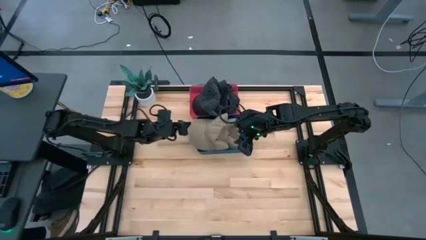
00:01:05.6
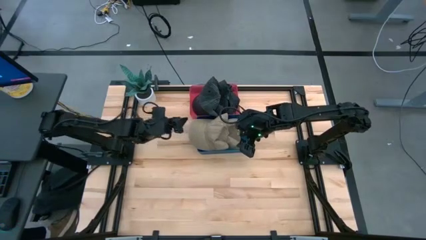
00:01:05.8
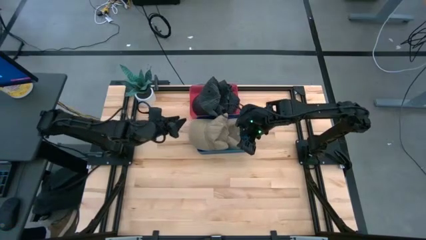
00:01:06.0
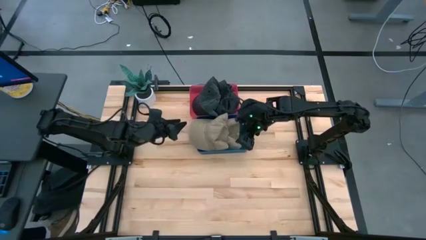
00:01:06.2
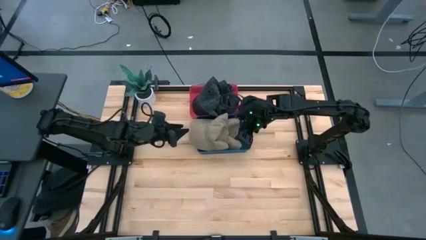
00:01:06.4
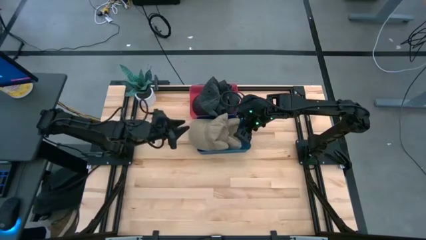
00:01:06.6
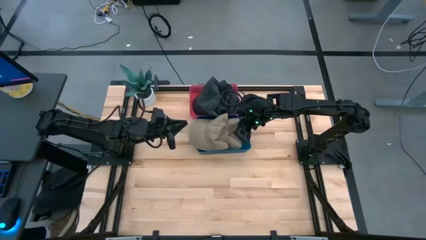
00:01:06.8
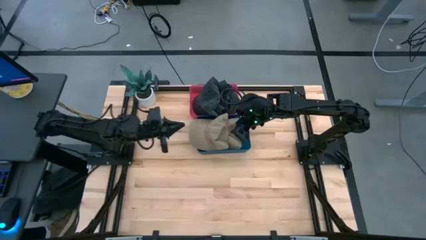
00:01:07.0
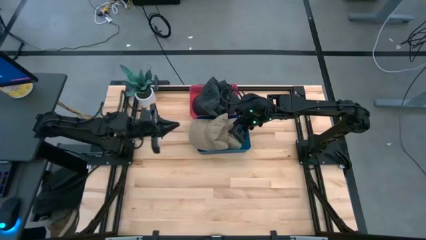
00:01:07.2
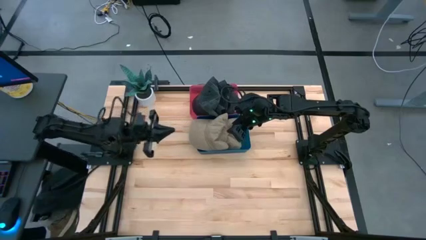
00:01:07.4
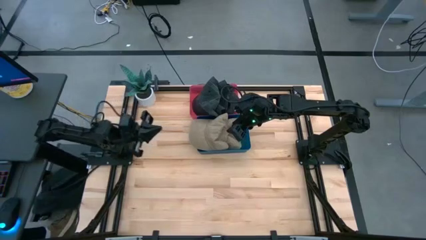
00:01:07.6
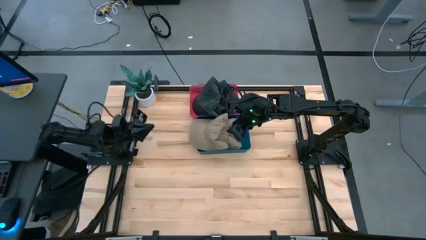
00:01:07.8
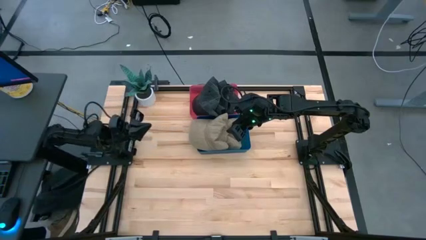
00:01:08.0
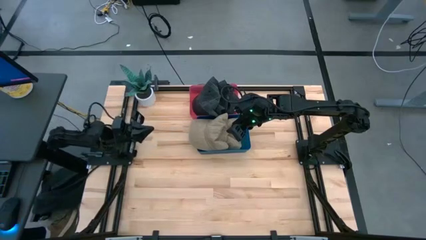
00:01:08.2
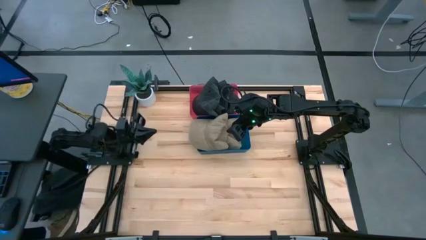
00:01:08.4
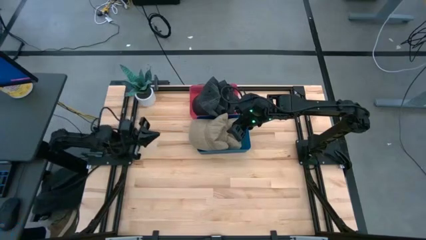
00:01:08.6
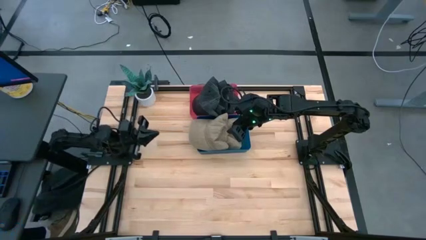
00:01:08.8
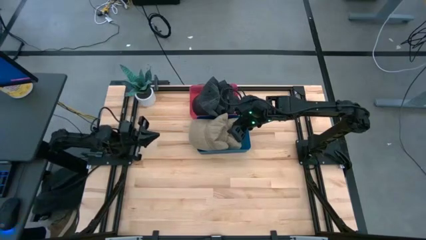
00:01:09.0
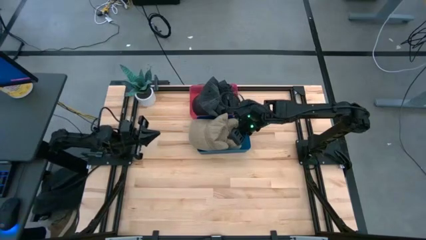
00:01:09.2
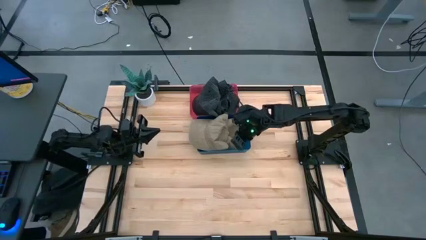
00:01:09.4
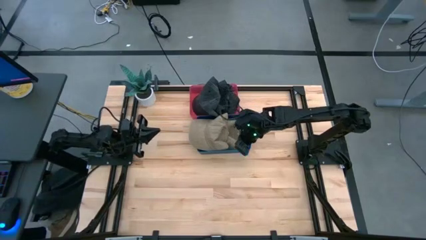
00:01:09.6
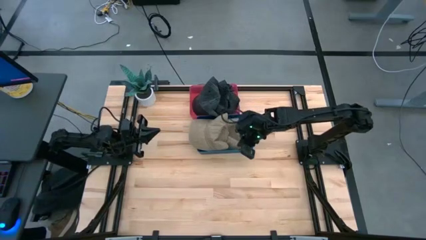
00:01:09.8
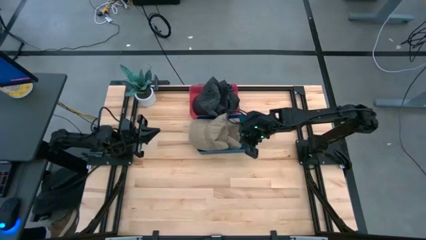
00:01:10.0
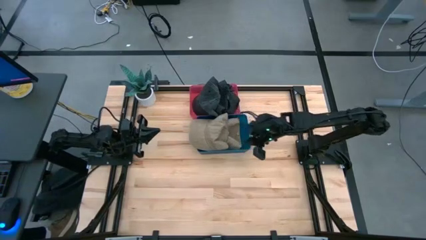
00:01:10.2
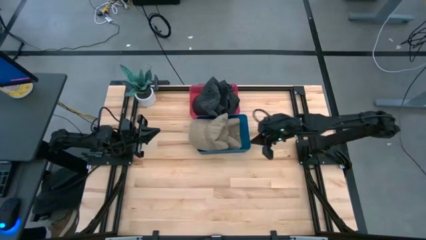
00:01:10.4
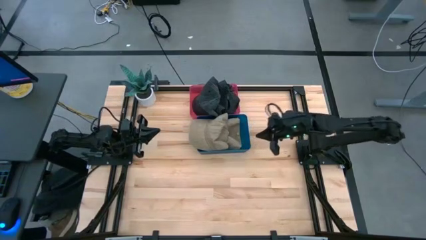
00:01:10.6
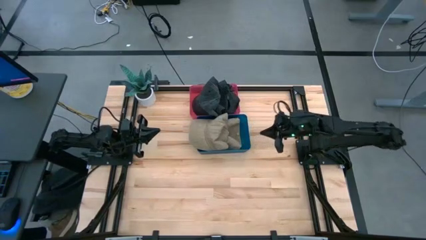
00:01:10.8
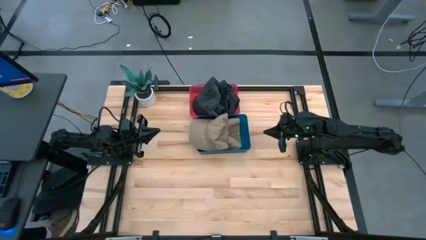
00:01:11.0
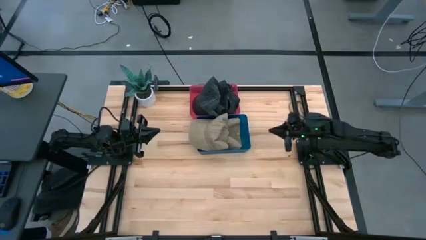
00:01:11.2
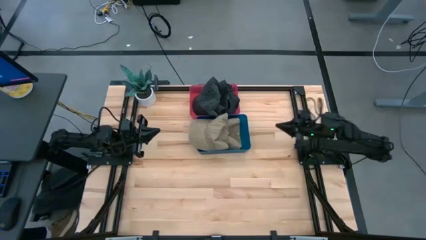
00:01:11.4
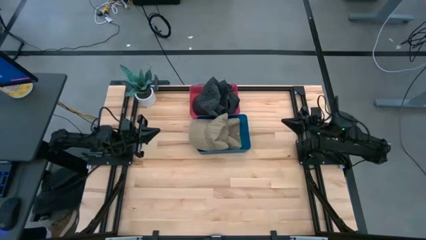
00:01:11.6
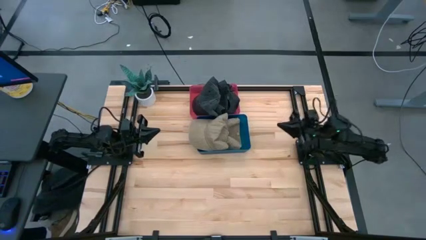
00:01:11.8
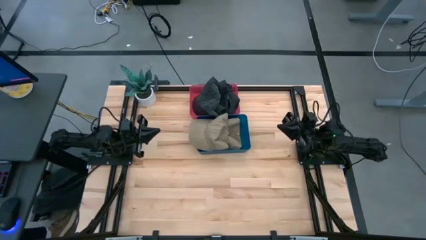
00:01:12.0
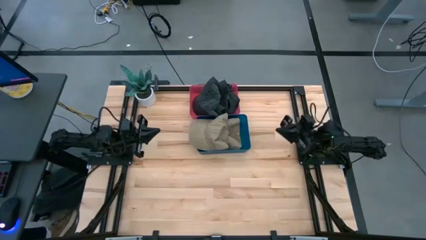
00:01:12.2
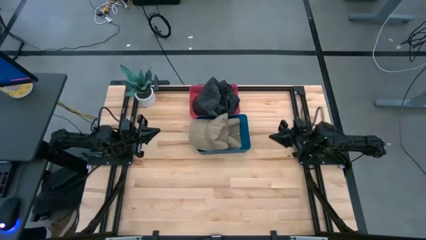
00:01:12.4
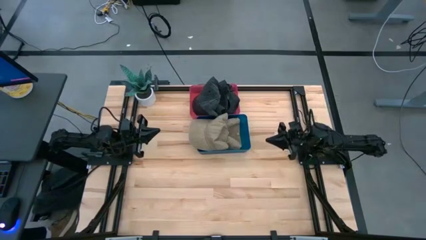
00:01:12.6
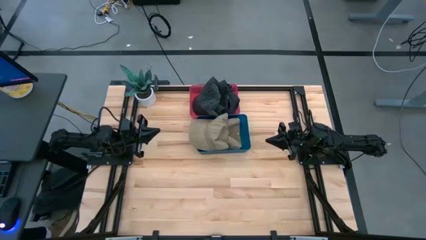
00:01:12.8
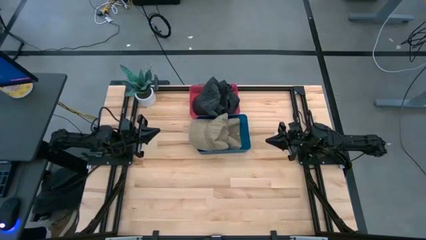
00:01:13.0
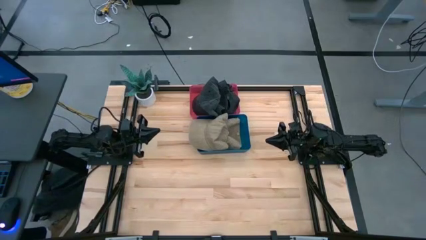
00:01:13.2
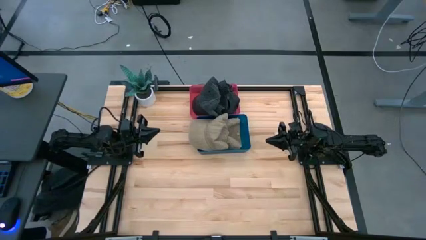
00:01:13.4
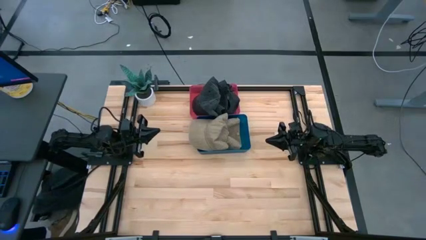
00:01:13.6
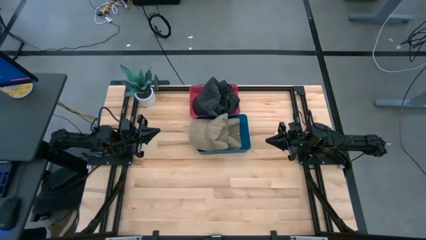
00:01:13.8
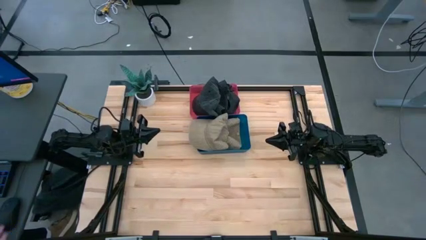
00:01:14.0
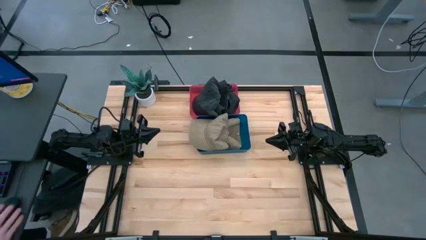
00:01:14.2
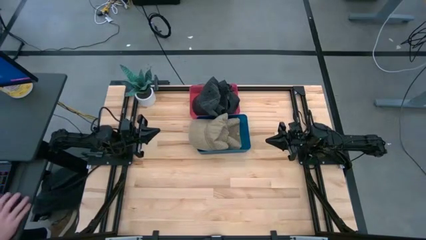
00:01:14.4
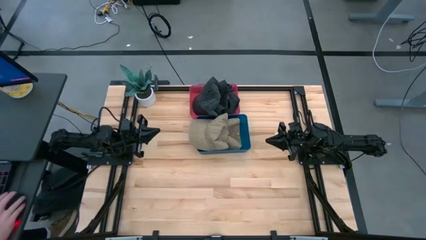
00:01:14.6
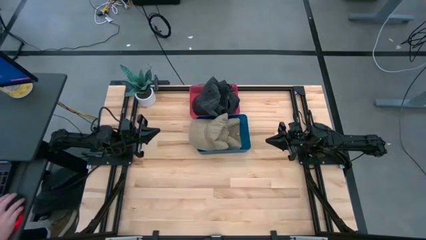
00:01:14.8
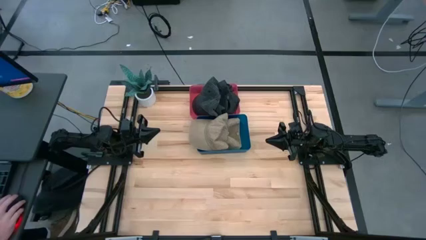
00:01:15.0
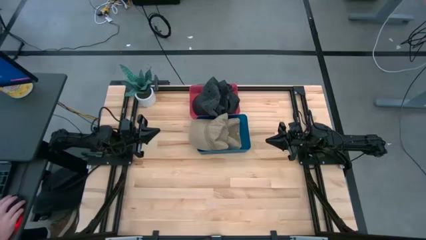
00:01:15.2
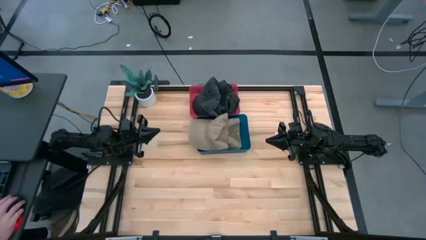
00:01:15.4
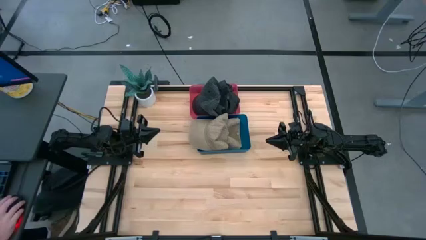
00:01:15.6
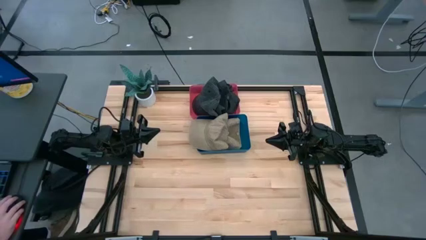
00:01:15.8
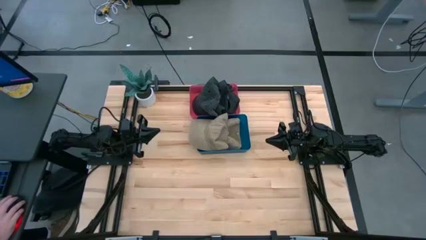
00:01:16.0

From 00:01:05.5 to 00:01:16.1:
Task: Pick & Place hat
Return to Home Position

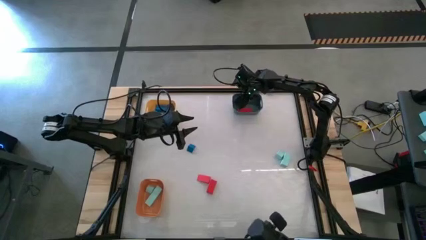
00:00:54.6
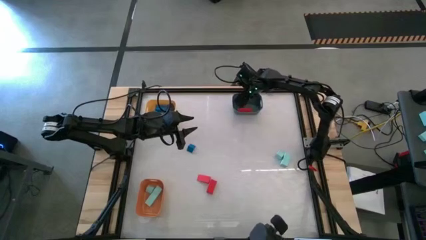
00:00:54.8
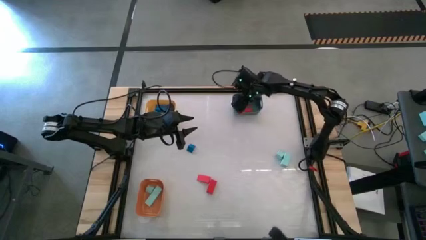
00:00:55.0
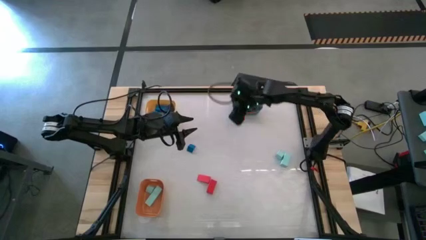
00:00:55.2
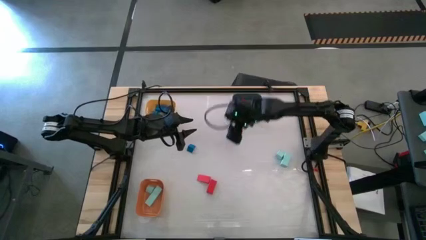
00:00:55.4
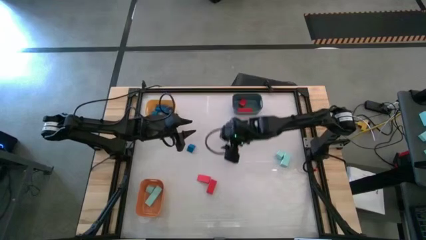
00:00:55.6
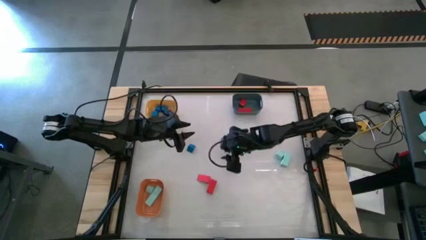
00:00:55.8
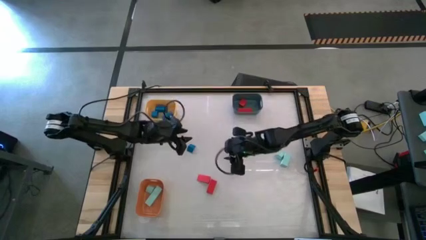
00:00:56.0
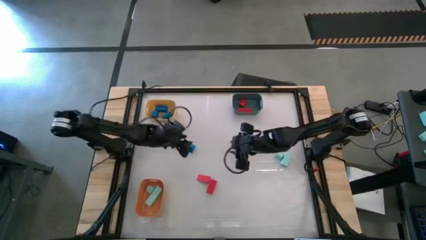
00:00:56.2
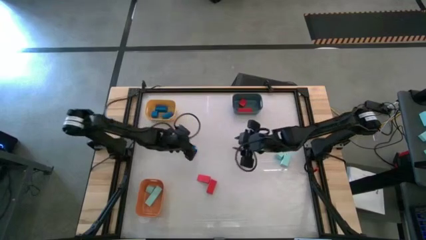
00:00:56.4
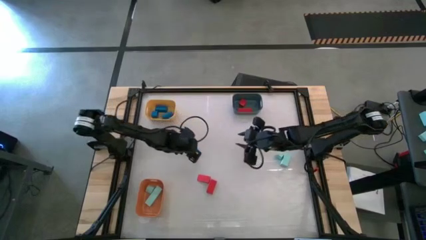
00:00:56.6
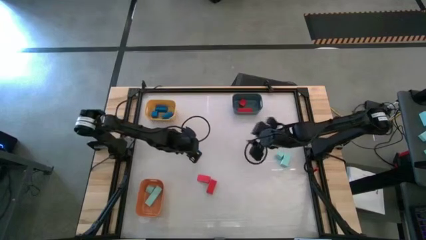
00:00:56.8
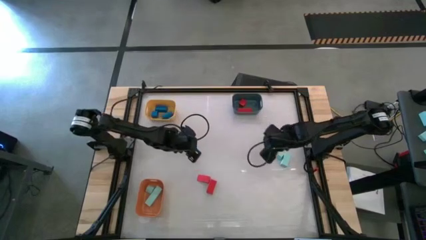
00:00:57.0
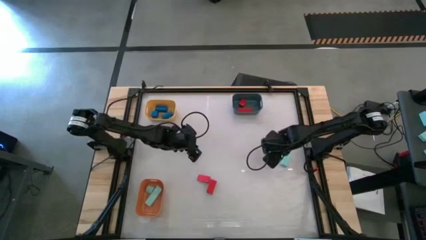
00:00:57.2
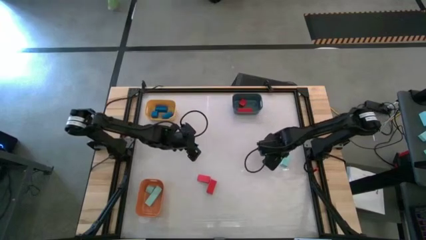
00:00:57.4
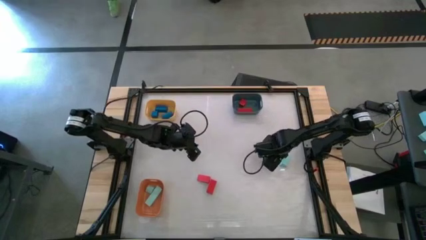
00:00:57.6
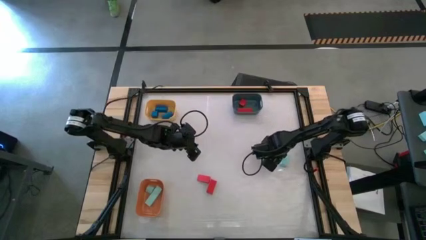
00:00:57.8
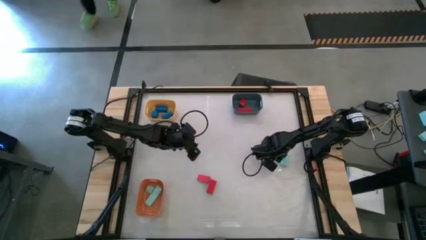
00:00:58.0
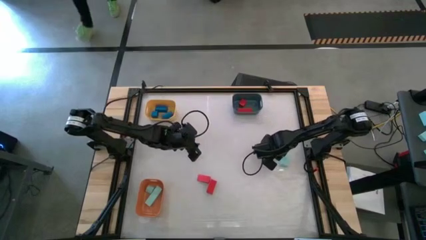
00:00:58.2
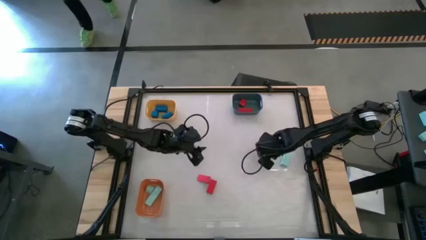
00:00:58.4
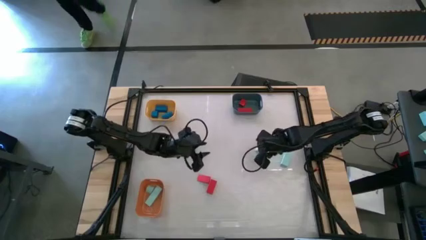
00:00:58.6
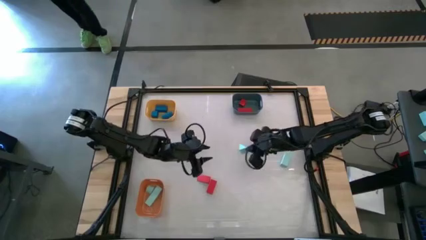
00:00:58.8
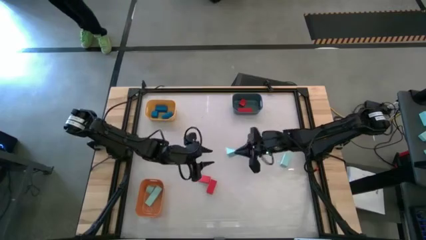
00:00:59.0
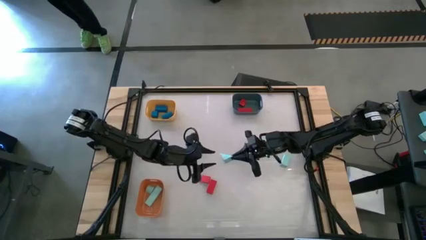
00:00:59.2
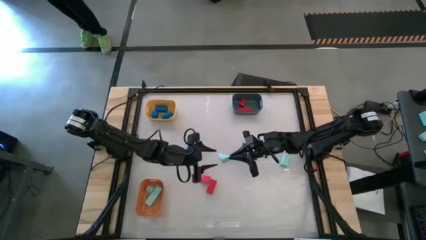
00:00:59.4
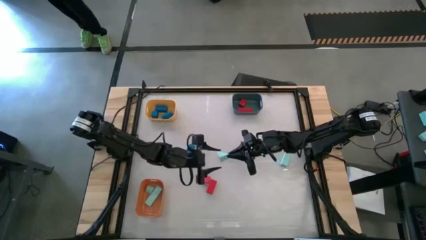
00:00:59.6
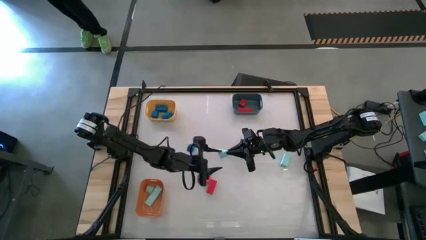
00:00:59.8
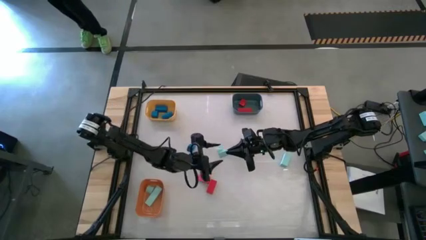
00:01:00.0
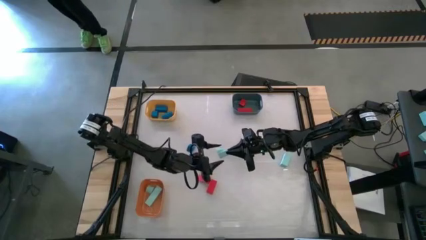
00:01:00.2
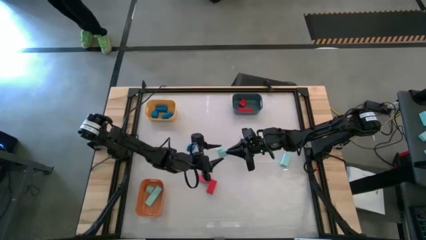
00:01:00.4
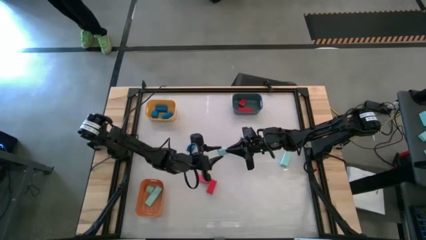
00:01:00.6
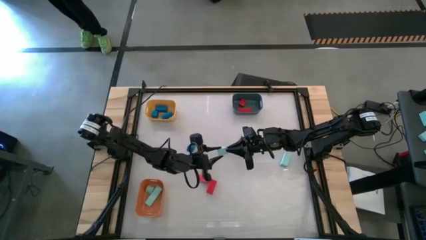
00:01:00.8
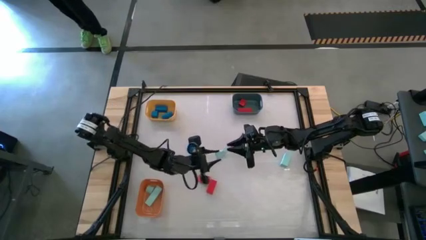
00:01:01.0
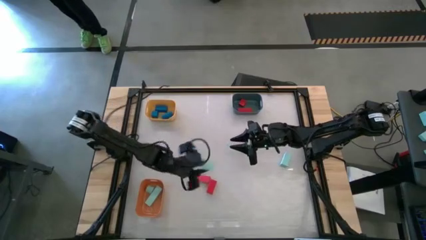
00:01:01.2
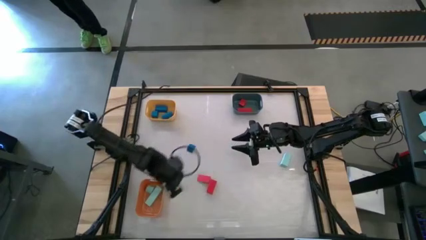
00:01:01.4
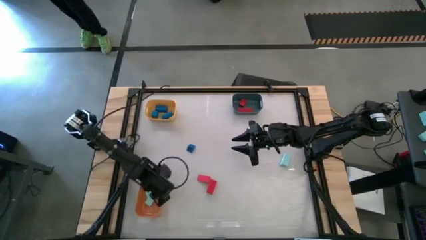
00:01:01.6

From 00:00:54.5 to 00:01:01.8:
Task: Sort & place blocks by color
Put the left light blue block into the orange bin
